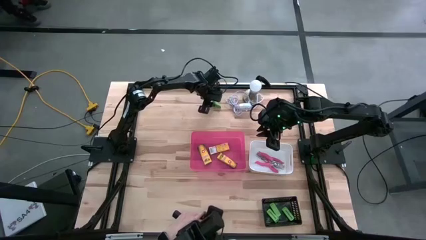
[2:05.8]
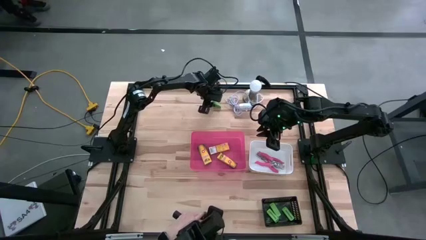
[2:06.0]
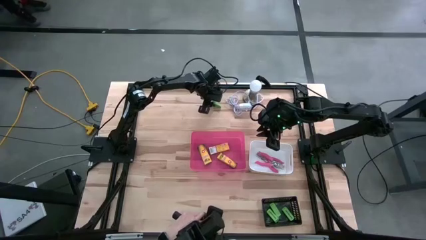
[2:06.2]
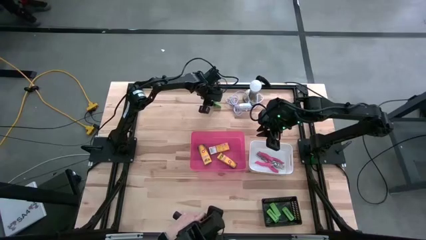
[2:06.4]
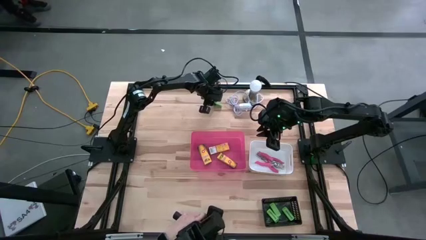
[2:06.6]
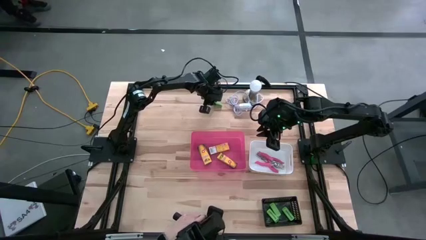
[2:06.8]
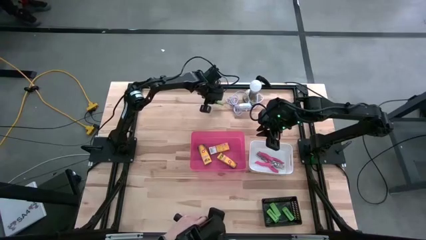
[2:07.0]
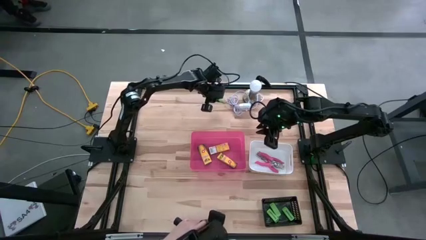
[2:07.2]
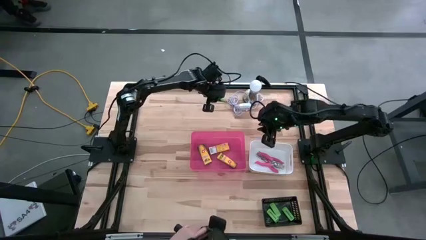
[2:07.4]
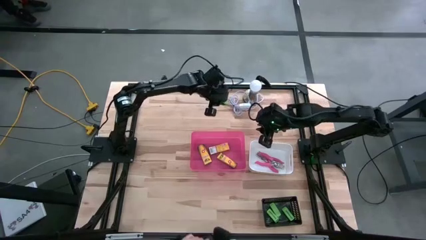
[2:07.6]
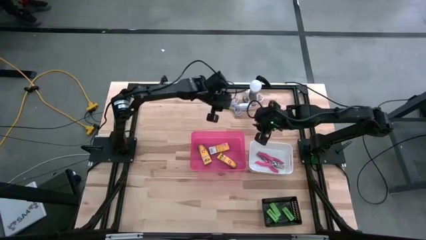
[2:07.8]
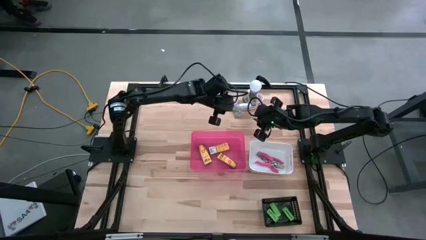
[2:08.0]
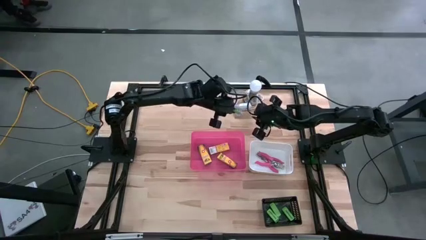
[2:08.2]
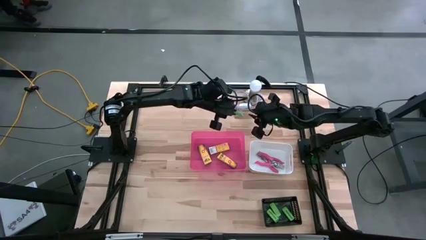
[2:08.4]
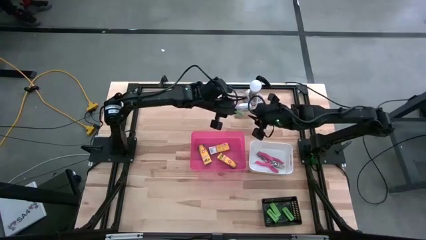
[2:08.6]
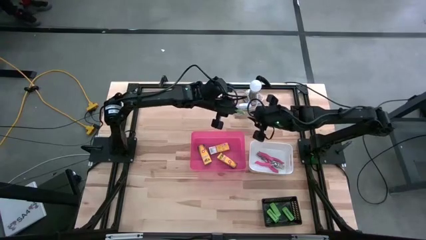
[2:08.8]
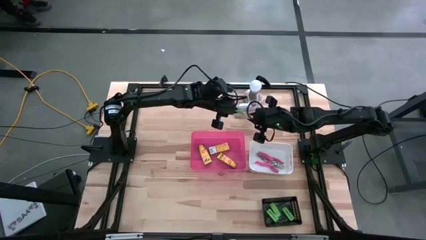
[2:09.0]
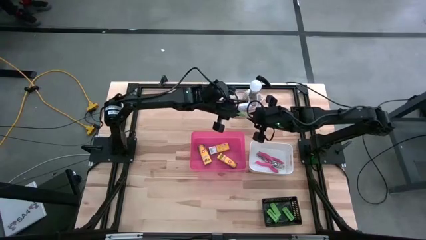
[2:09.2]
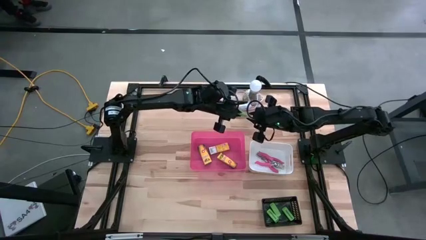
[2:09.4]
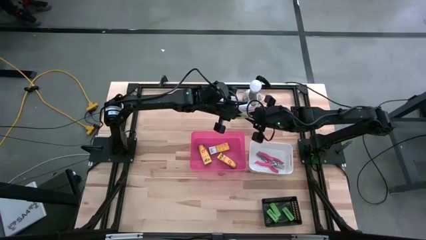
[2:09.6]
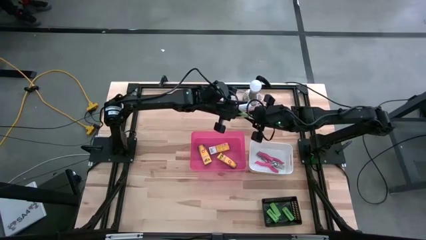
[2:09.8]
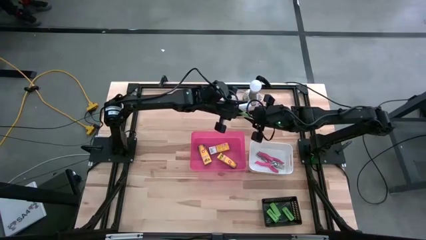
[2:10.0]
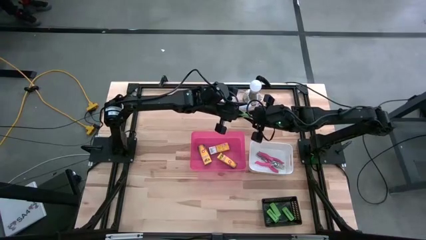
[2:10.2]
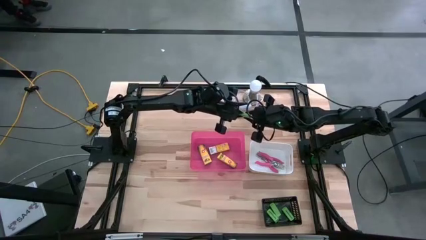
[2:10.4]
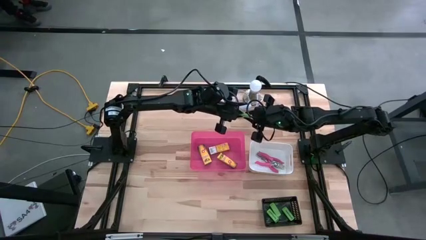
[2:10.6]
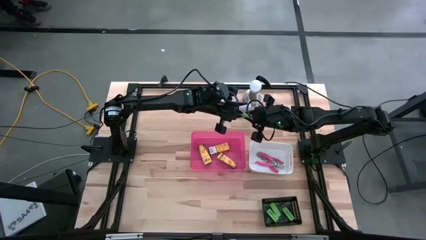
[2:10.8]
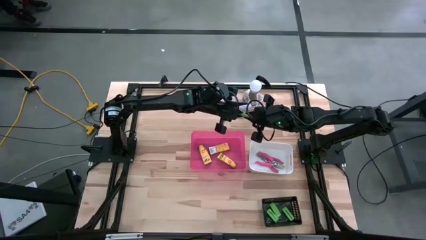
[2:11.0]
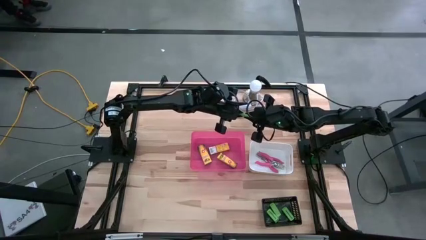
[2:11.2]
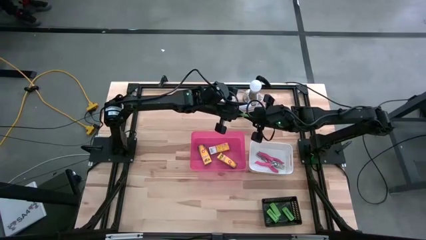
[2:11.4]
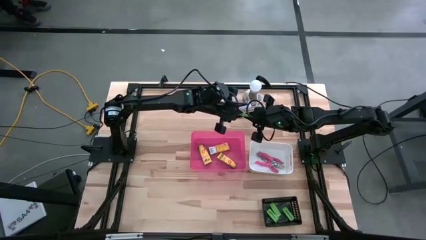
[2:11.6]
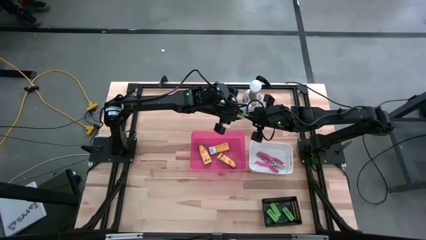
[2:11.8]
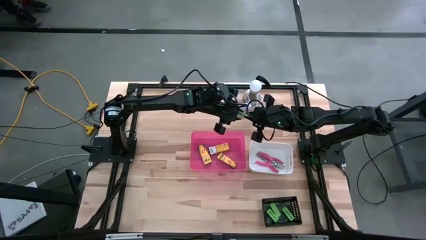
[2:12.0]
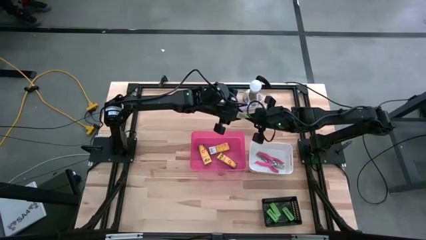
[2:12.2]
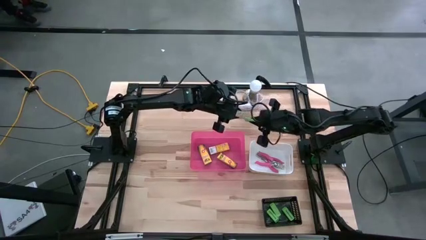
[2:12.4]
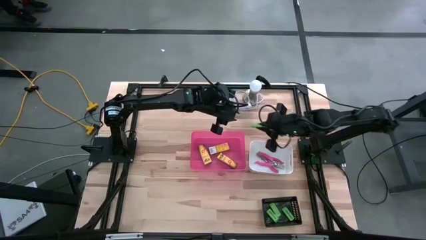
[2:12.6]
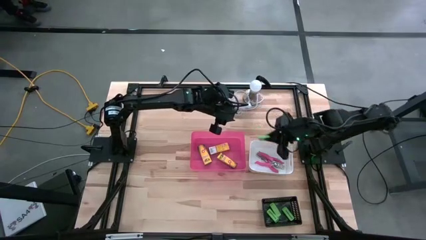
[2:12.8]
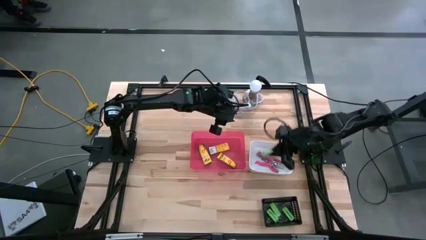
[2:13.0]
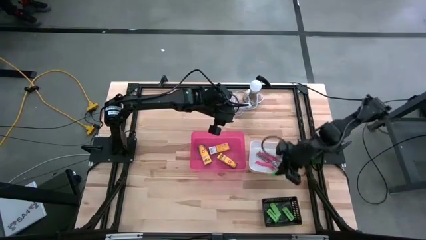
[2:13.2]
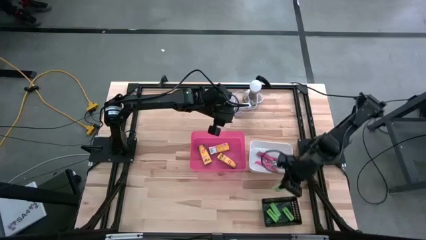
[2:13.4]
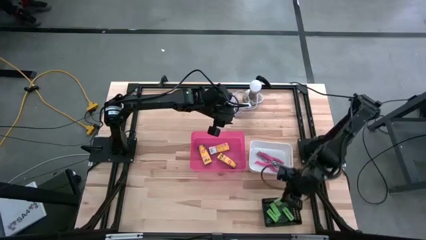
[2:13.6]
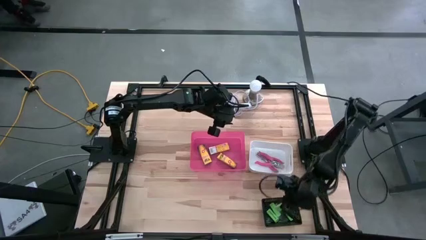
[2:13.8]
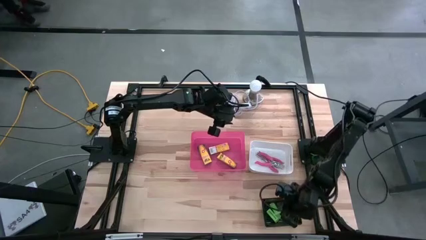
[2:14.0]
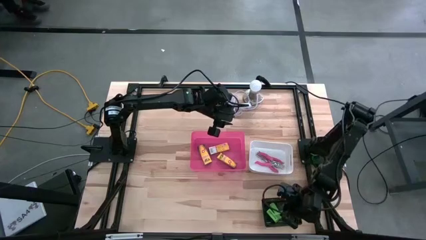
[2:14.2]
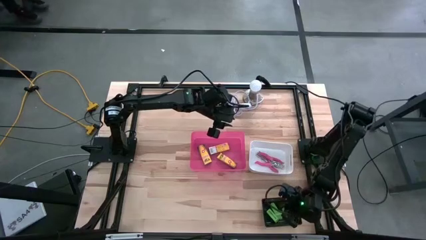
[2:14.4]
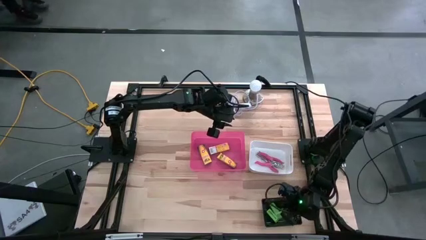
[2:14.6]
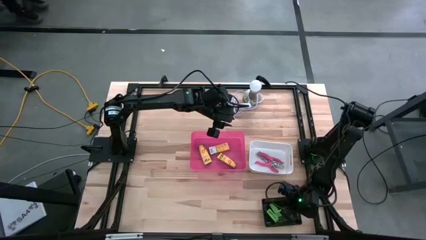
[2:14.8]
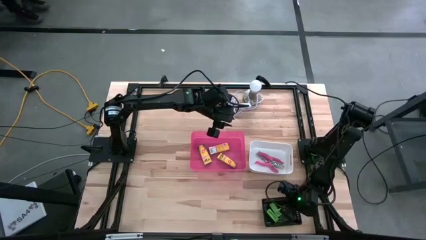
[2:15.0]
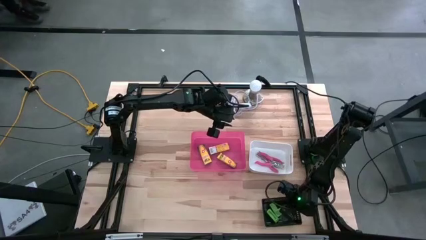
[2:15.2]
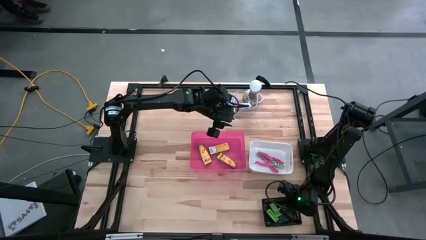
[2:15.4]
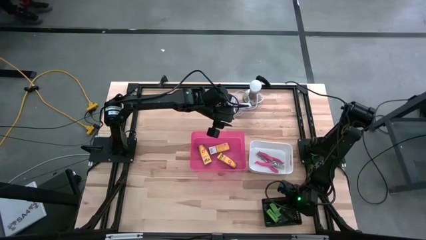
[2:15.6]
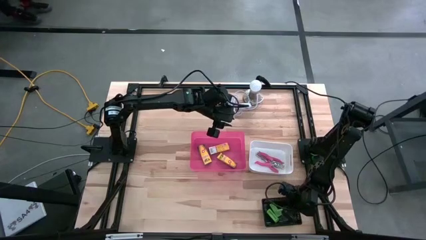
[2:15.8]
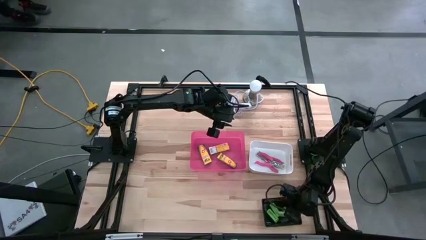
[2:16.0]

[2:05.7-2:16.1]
Task: Pick & Place School Supplies
Put the green eraser into the black bin

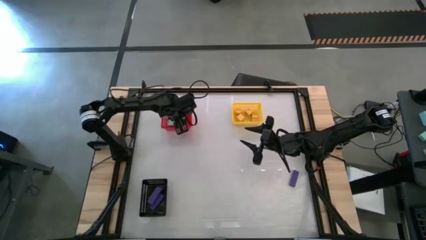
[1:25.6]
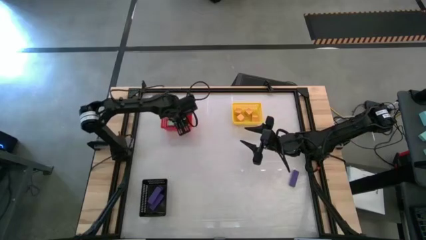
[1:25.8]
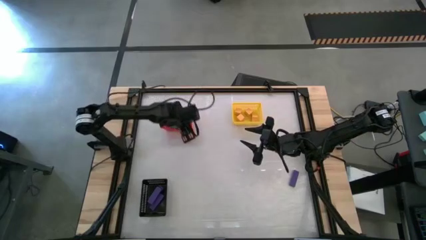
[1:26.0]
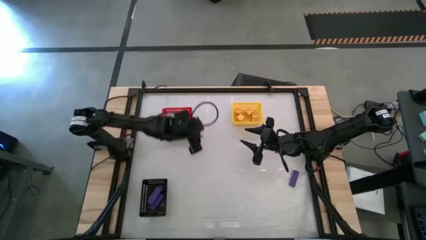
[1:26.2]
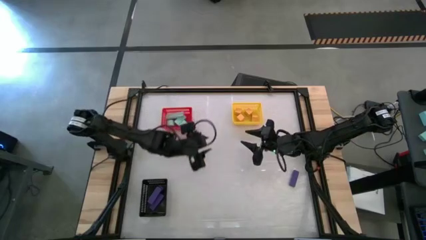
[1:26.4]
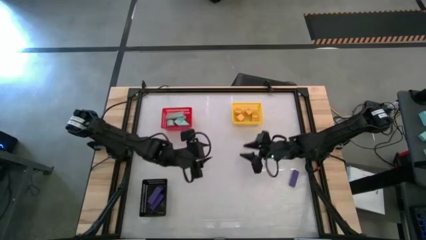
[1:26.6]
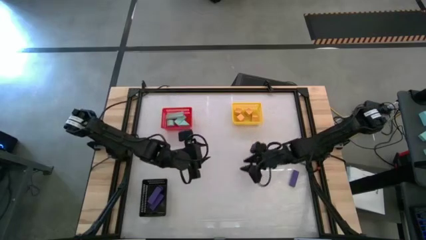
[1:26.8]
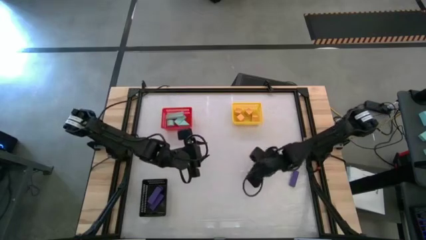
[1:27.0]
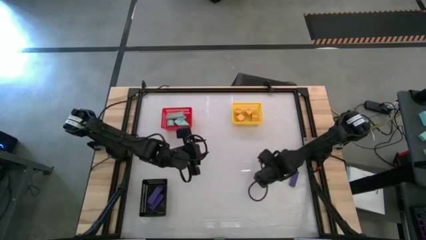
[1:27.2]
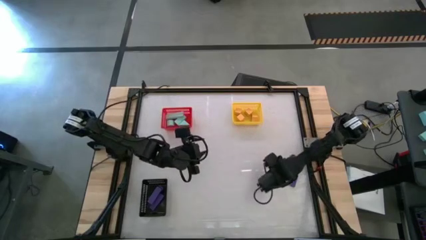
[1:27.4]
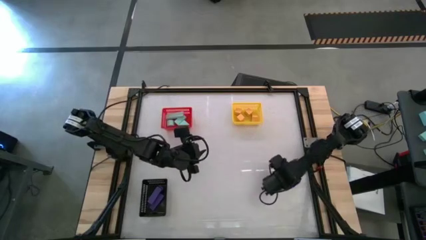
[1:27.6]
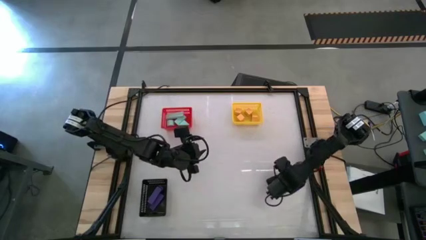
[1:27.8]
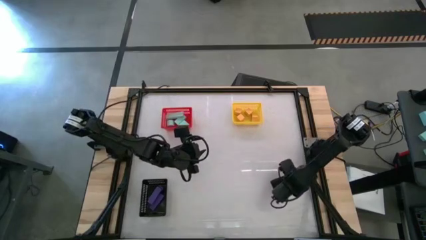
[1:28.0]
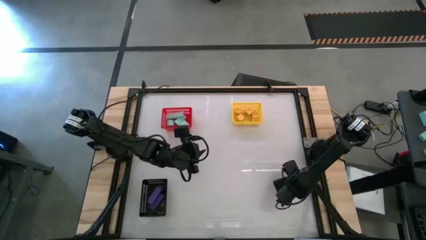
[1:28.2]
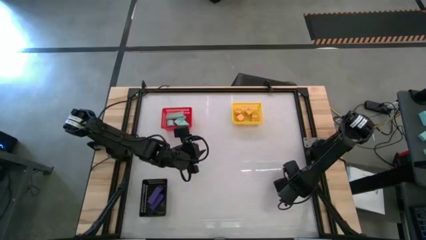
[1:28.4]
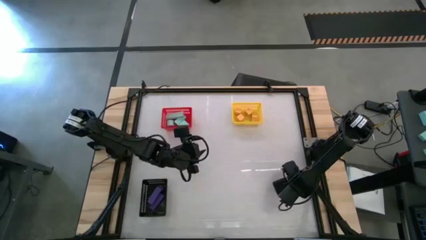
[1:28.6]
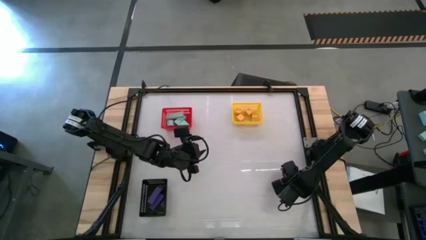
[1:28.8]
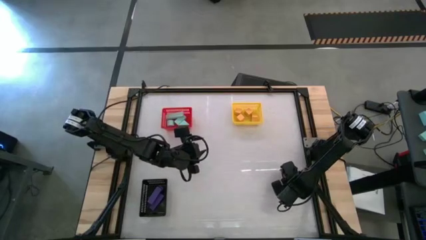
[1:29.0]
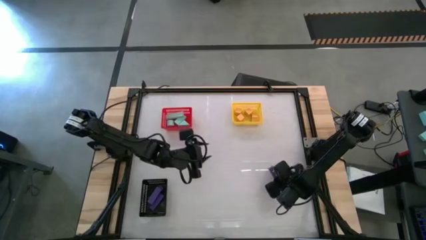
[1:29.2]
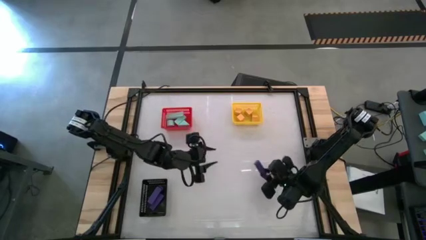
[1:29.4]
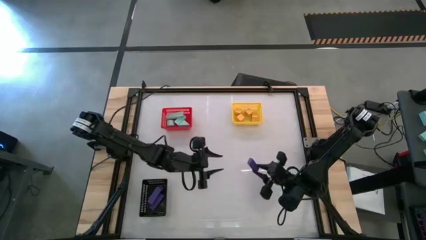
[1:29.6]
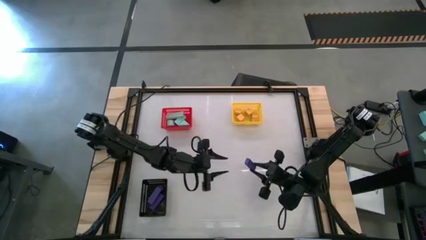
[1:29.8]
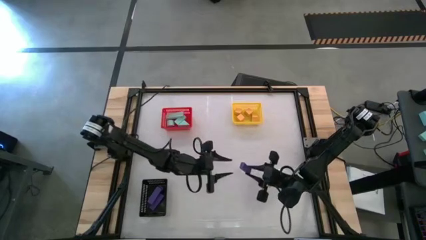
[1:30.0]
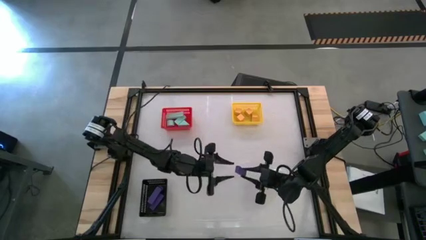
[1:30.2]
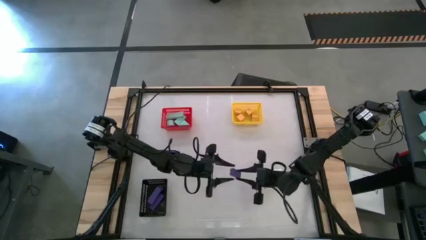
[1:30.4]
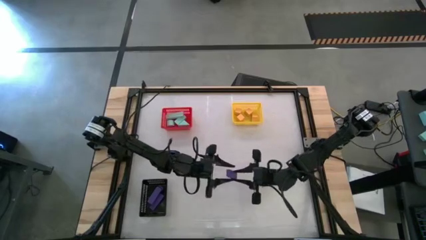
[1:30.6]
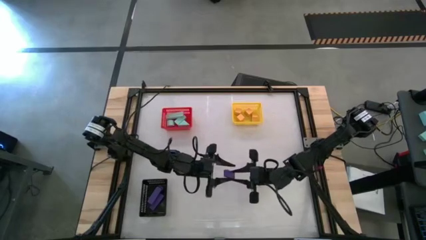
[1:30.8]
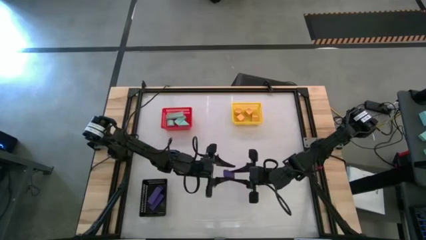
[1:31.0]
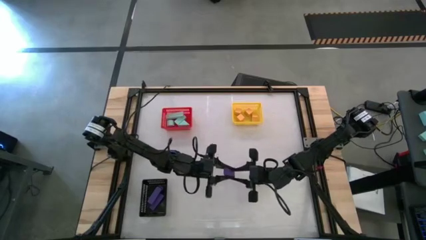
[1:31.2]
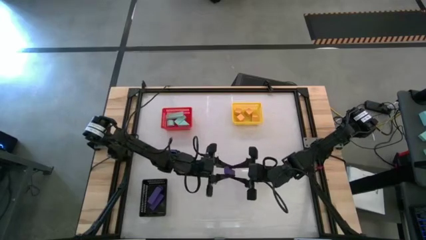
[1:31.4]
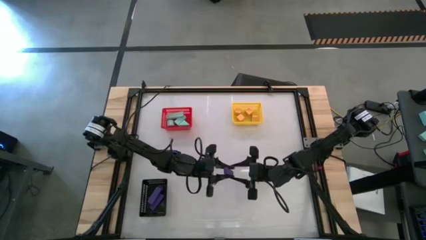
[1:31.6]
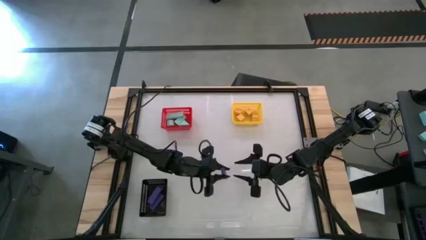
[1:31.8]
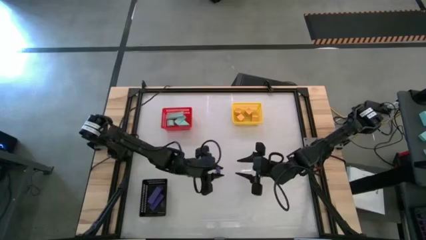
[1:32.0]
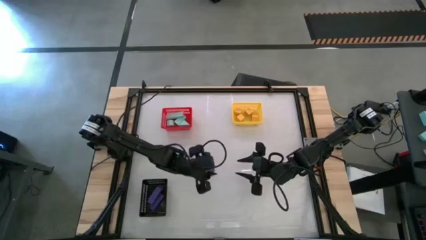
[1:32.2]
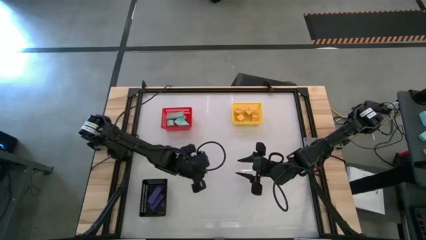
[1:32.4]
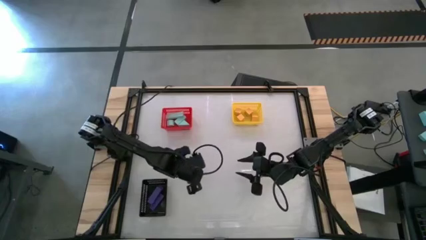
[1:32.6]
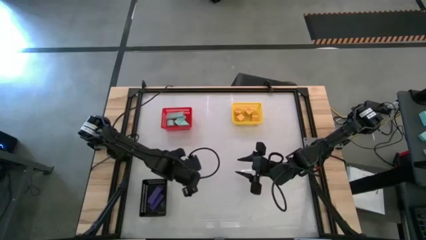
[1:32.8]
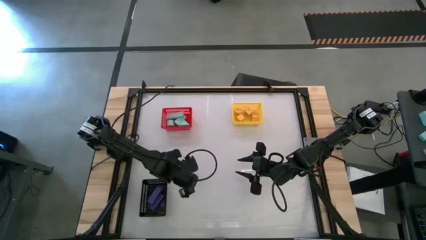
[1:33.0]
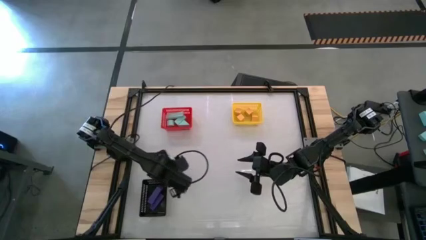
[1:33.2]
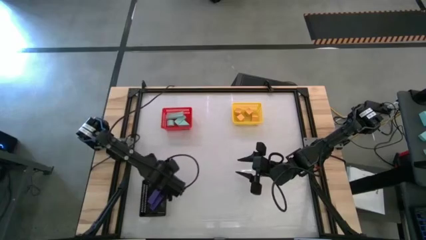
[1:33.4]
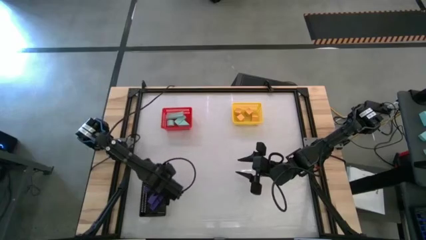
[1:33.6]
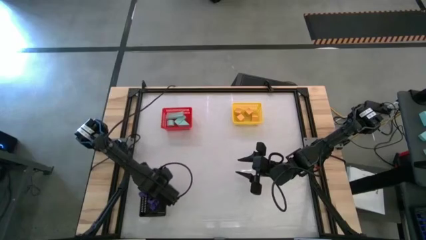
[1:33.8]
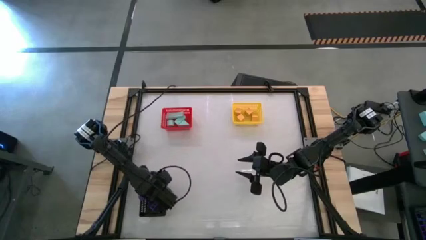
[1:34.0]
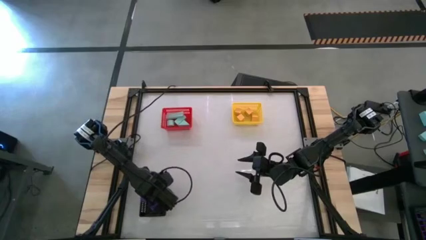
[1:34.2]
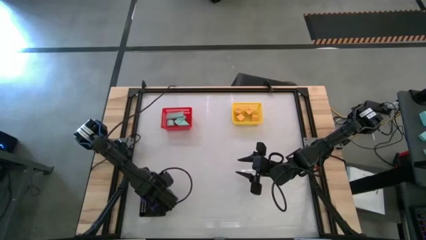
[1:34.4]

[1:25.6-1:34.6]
Task: Sort & place blocks by color
Put the purple block into the black bin
